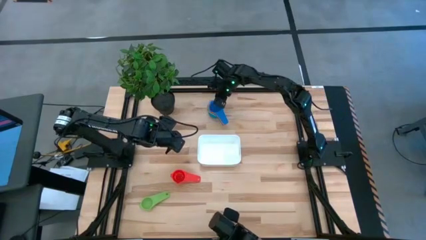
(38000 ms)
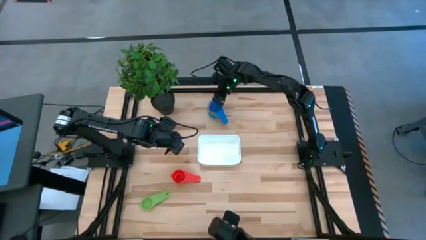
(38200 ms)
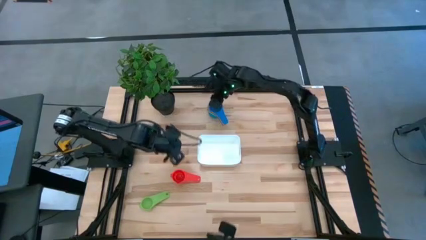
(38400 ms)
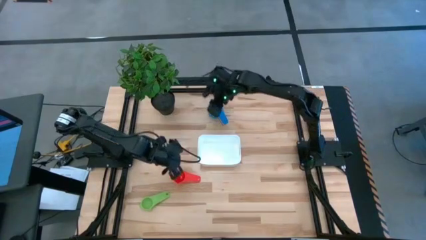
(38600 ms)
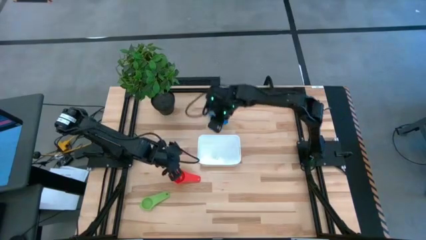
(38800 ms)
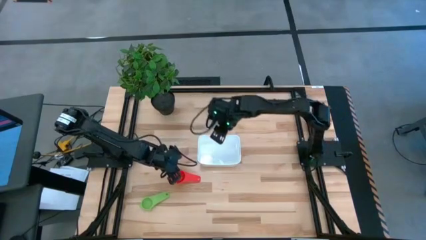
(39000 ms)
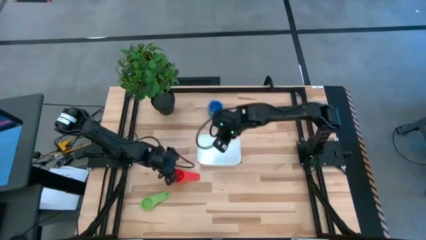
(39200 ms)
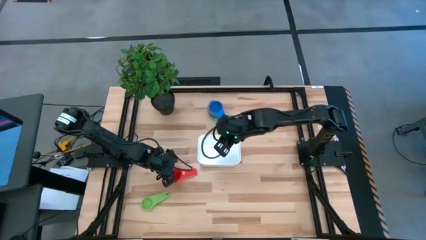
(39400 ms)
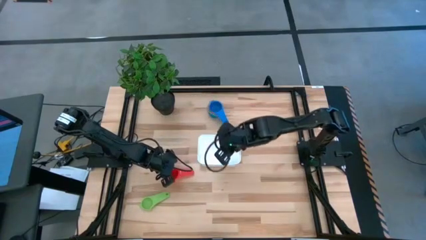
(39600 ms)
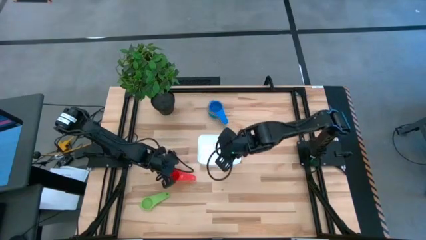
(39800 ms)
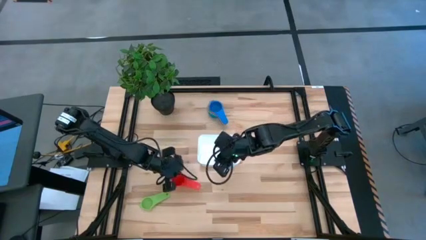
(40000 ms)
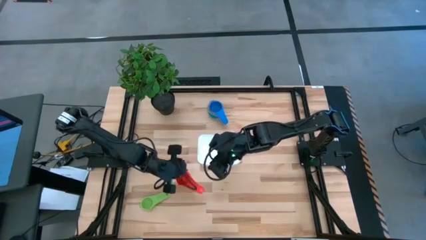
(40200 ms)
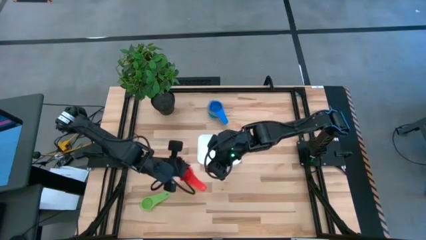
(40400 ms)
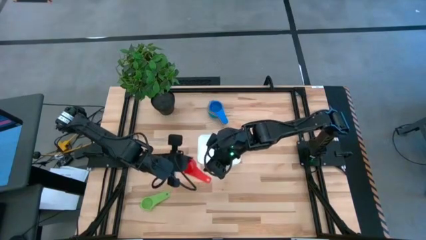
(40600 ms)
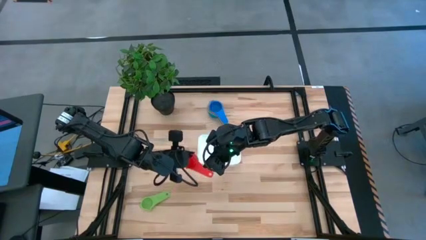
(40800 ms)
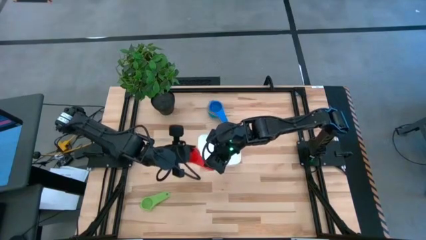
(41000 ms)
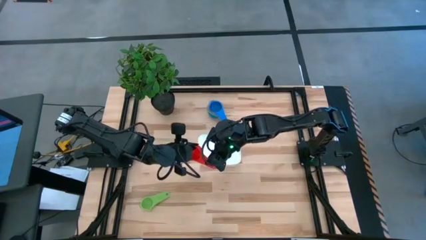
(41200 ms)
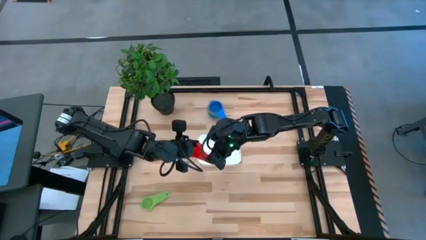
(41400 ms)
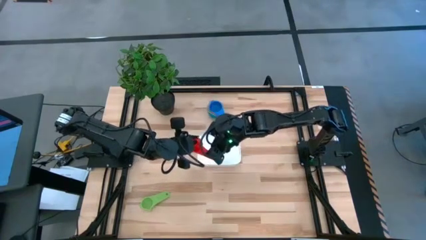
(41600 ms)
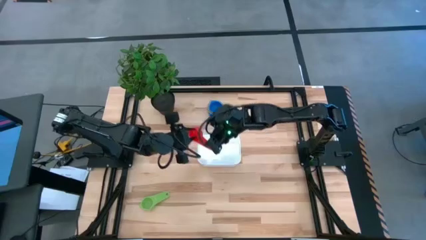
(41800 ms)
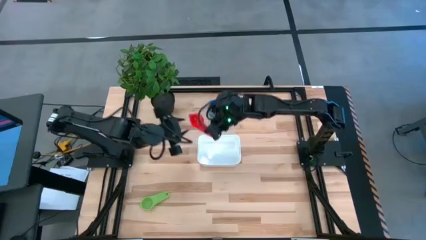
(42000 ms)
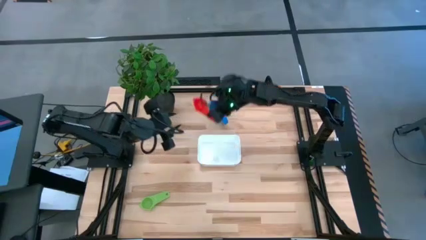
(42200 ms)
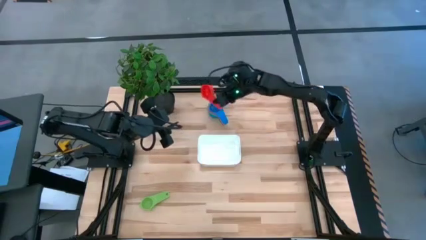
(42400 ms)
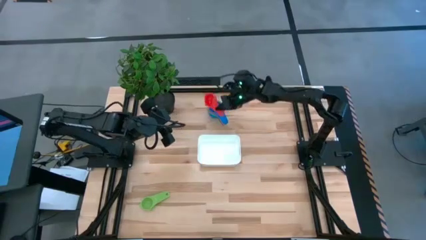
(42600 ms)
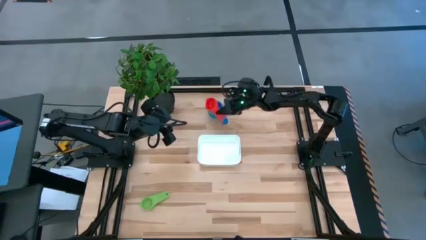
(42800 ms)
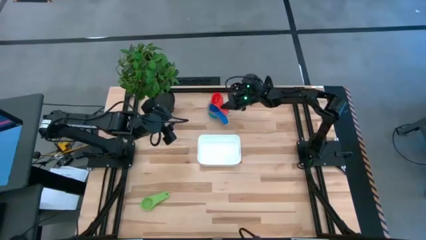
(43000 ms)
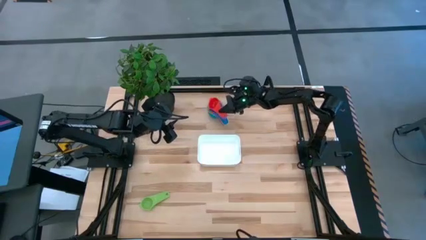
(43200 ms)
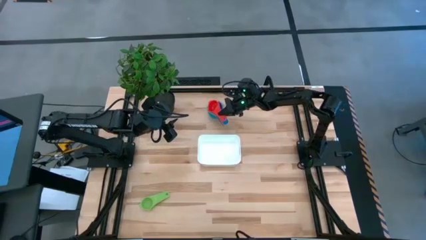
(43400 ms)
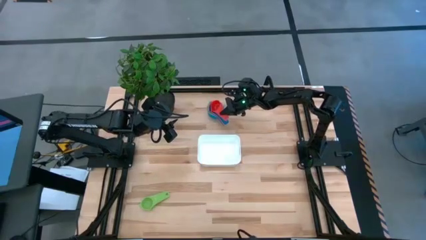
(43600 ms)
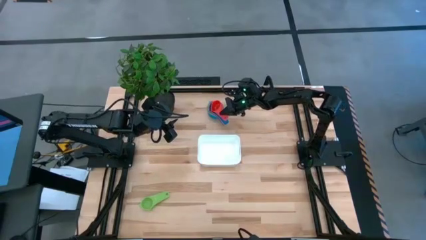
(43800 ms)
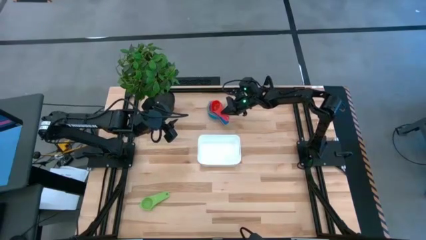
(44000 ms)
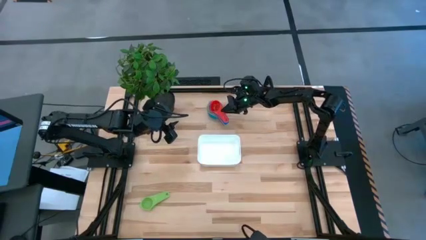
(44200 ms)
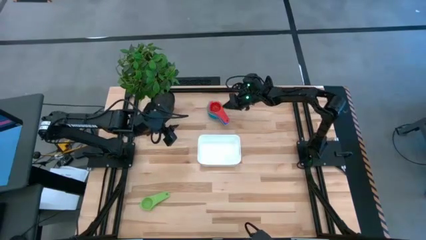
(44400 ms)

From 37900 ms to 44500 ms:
Task: Nest measuring cups in basket
Stack the red measuring cup on top of the blue measuring cup

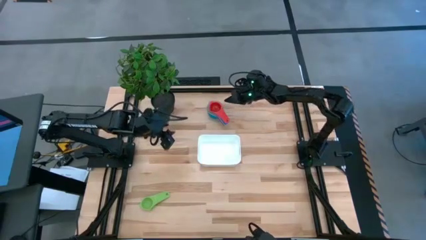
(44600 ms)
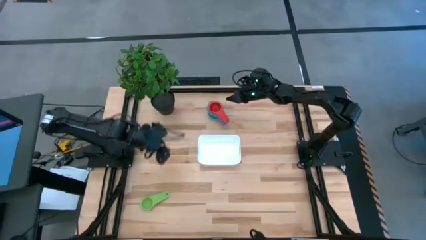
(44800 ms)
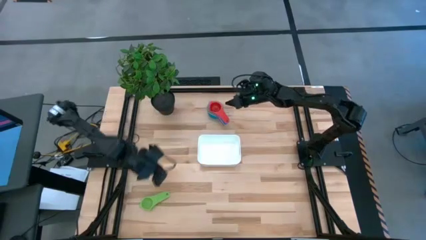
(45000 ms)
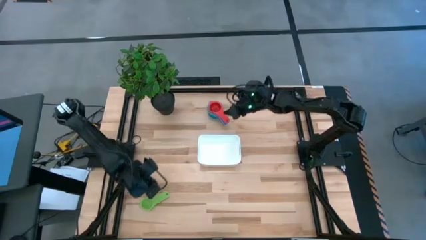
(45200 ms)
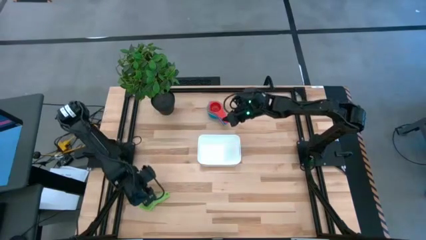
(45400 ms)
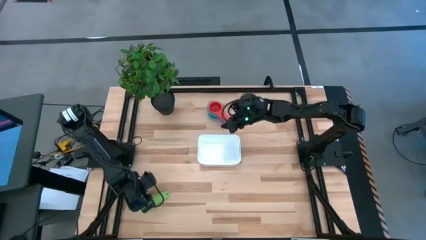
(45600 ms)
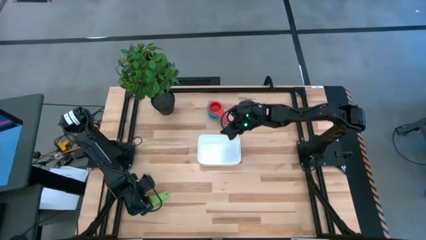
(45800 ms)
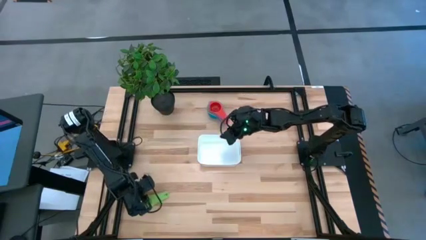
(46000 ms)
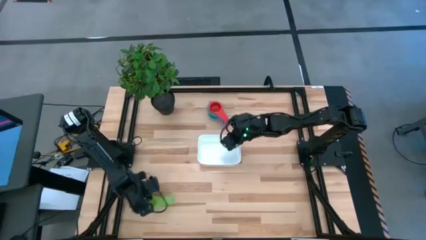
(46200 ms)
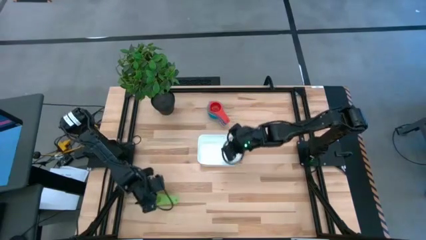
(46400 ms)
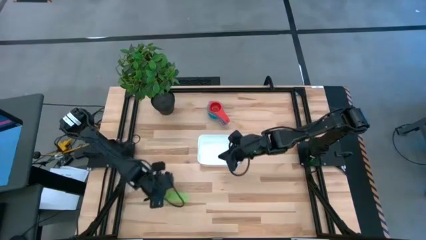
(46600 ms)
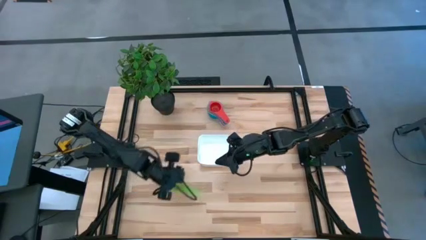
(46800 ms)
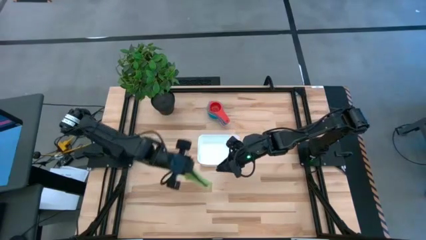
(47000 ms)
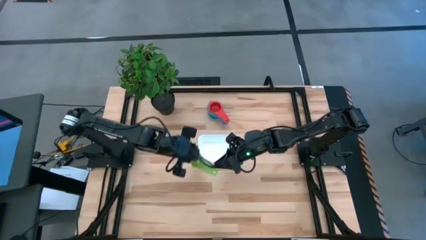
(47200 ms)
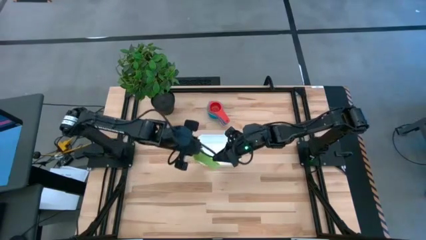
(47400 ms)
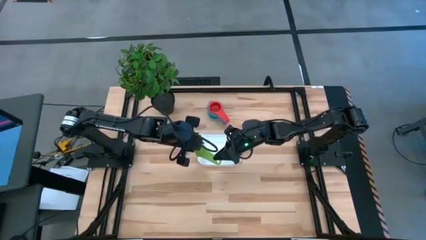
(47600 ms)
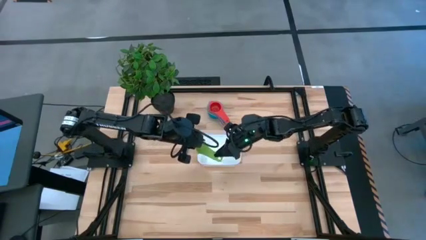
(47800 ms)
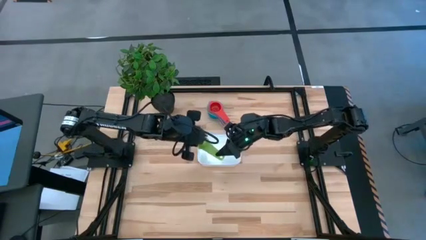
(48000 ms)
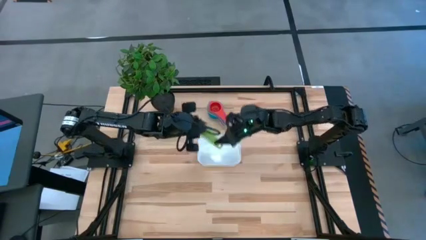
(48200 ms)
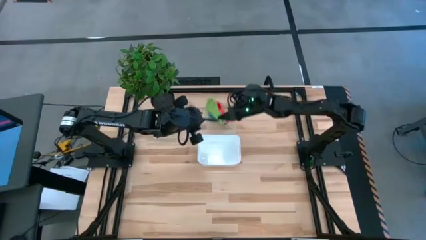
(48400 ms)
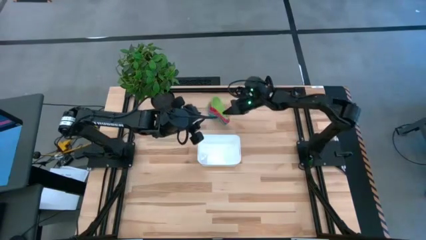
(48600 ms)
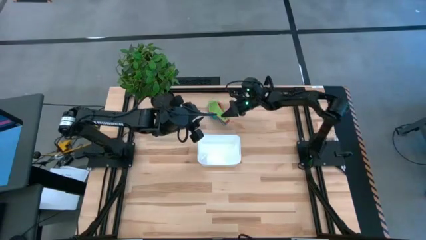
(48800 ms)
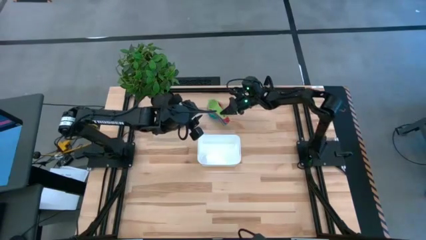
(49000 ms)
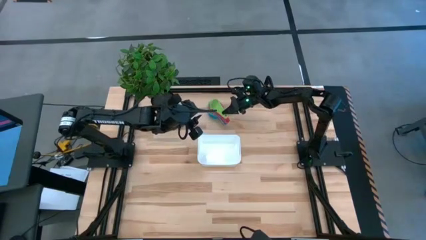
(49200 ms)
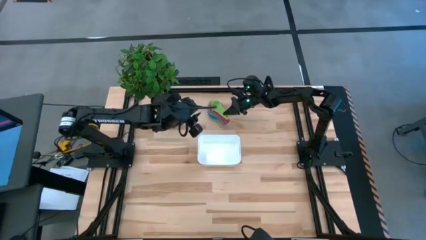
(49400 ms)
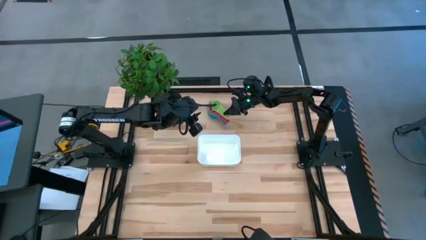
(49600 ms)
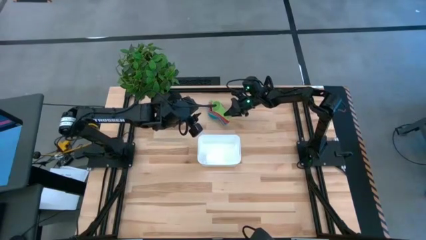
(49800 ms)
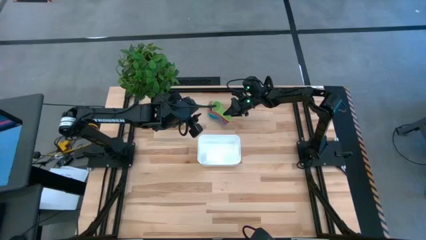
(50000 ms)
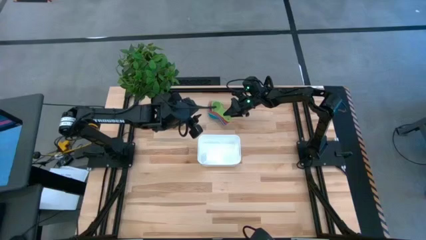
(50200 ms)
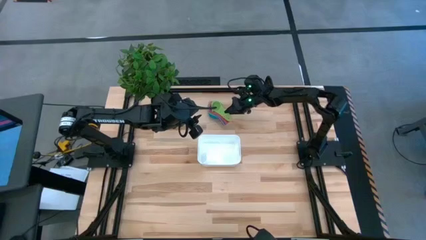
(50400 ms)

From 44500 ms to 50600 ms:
Stack the green measuring cup on top of the red measuring cup

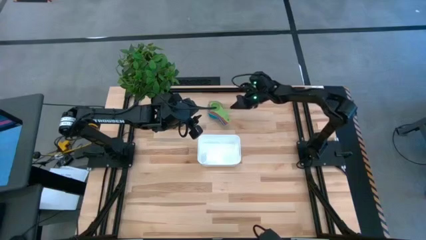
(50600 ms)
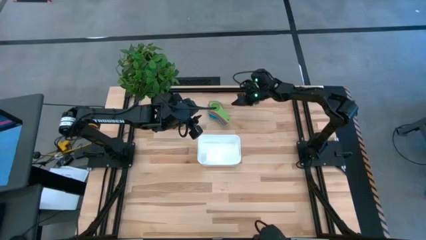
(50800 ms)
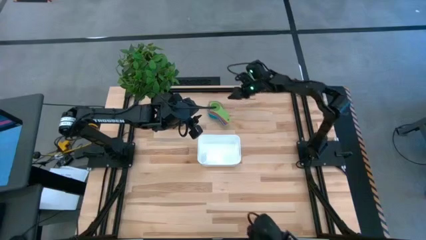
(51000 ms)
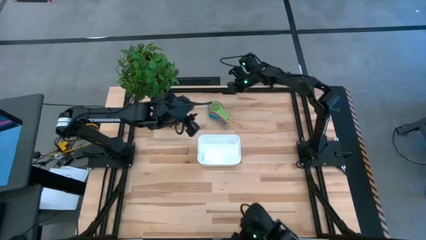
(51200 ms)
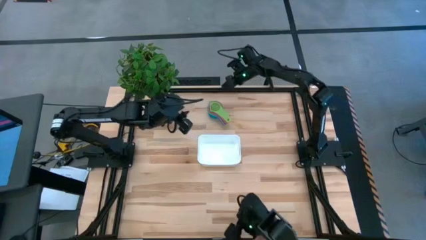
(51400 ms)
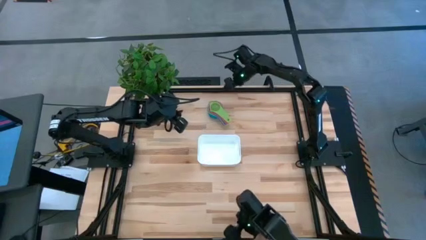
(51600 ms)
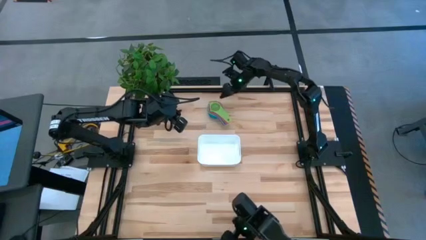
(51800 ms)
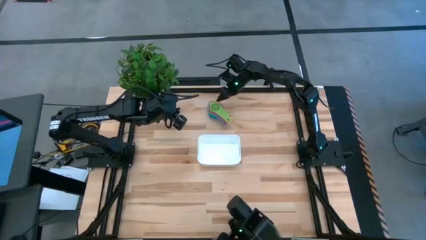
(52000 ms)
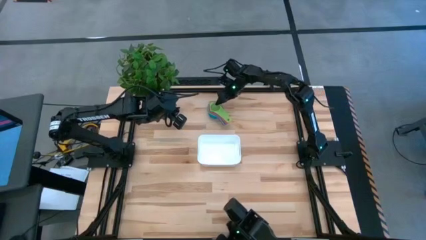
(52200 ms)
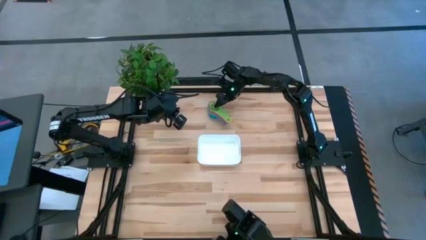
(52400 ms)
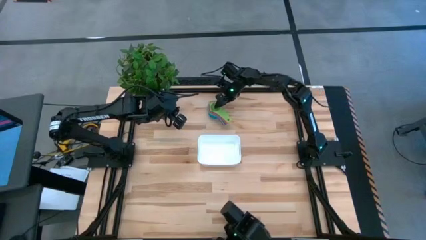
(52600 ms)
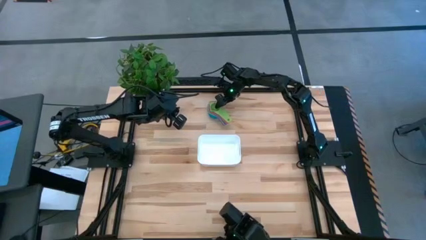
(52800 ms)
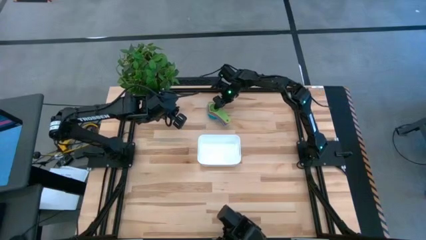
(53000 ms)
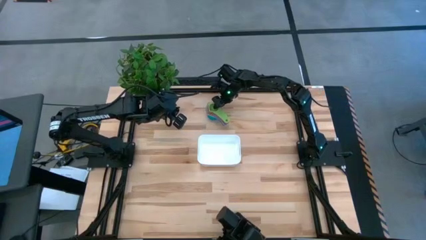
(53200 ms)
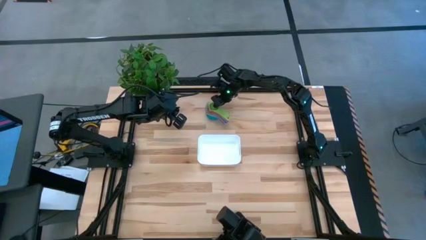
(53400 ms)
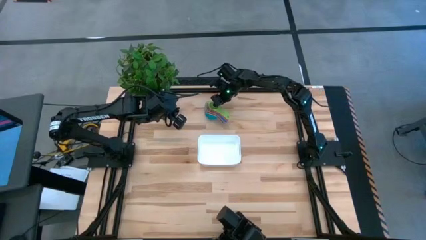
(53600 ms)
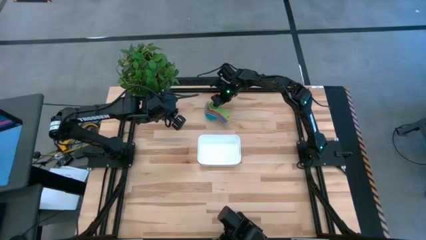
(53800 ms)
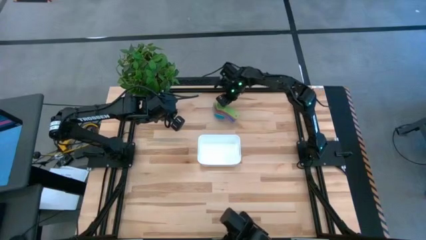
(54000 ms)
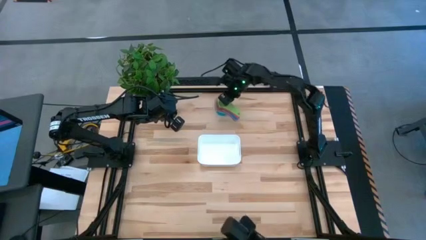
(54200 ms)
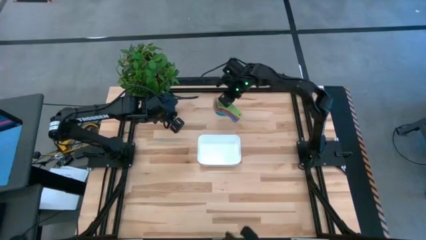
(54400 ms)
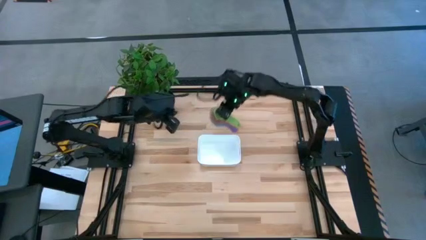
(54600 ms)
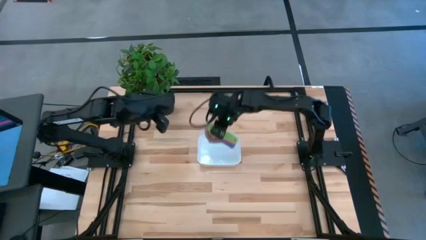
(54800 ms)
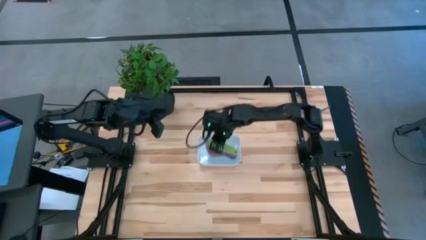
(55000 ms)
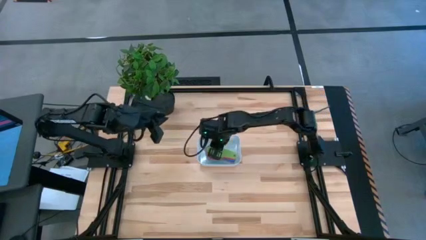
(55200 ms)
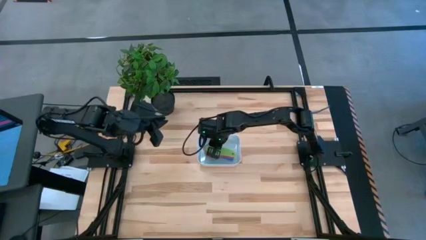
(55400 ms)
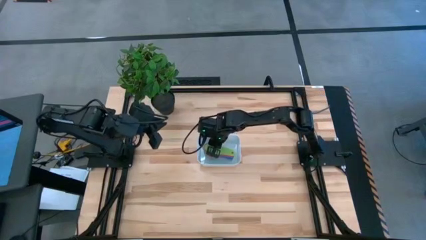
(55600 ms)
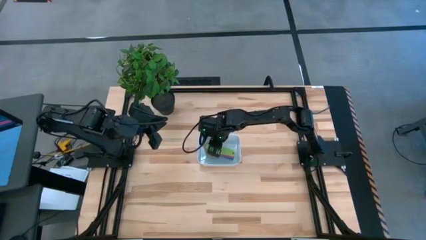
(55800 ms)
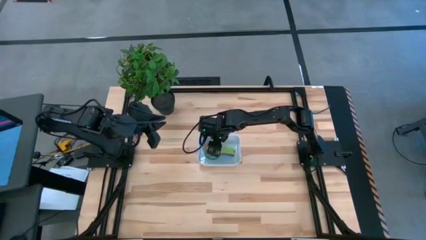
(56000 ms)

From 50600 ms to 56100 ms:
Put the stacked measuring cups on top of the white bin
